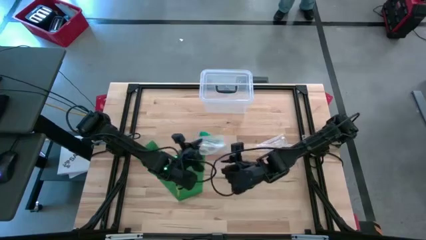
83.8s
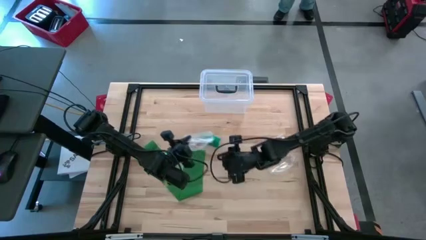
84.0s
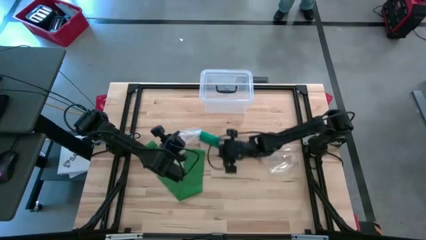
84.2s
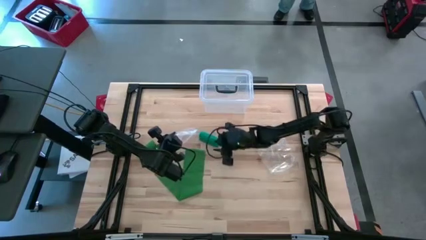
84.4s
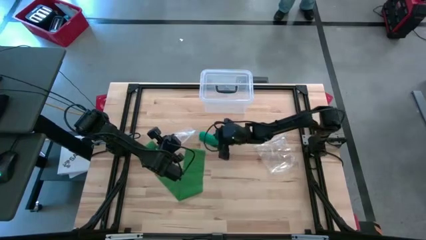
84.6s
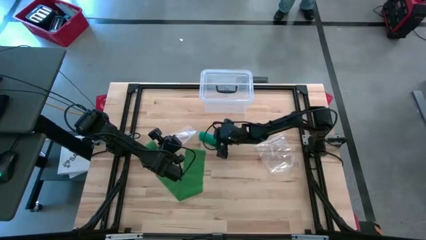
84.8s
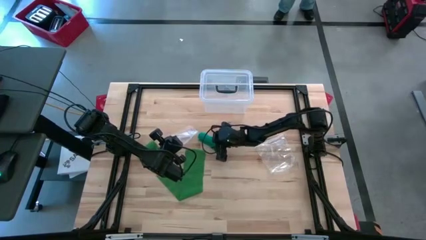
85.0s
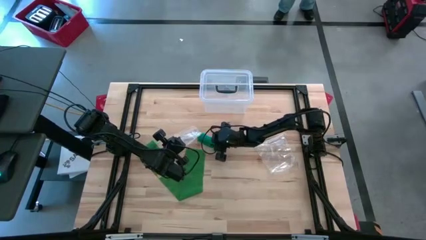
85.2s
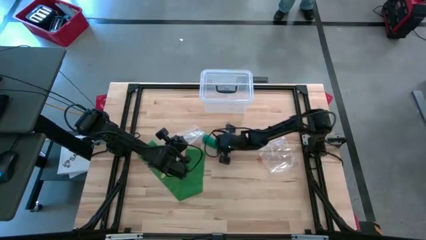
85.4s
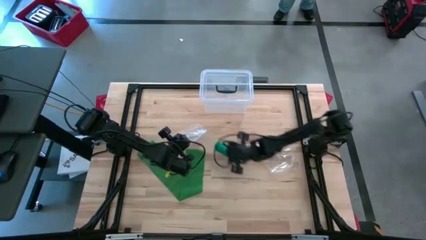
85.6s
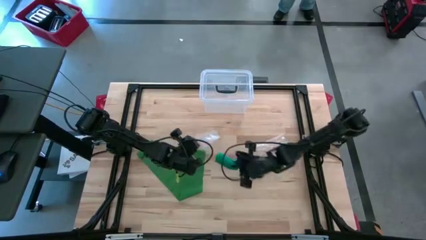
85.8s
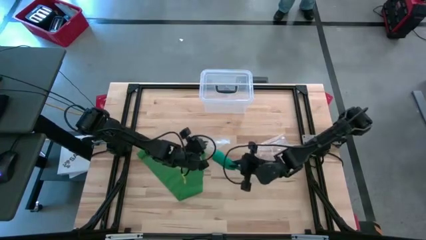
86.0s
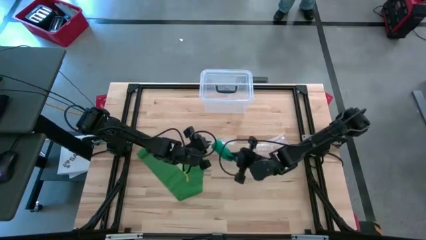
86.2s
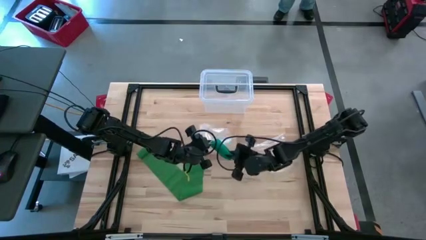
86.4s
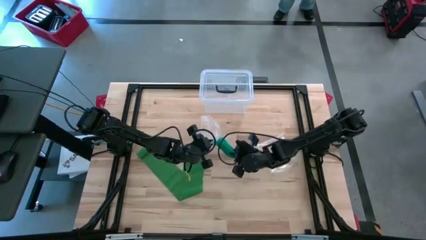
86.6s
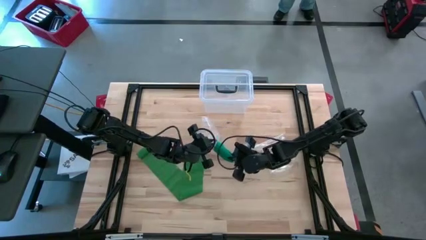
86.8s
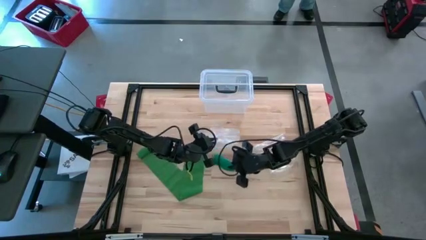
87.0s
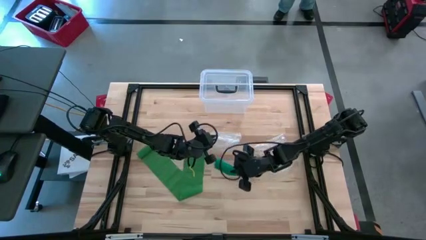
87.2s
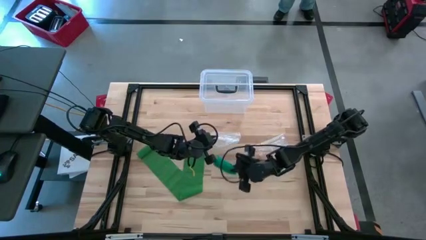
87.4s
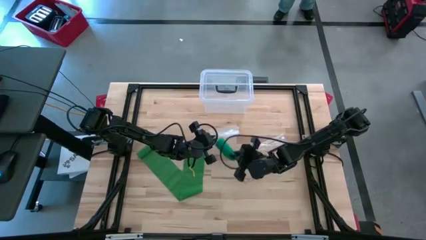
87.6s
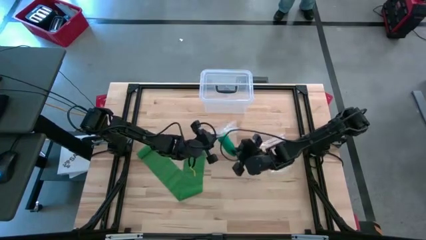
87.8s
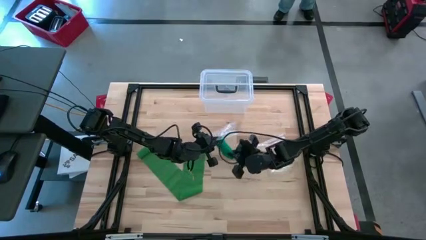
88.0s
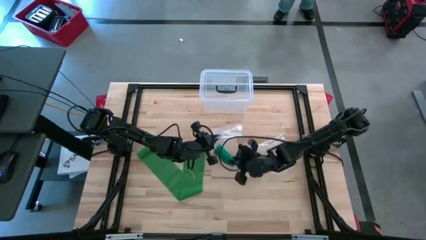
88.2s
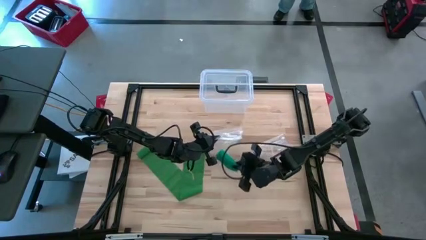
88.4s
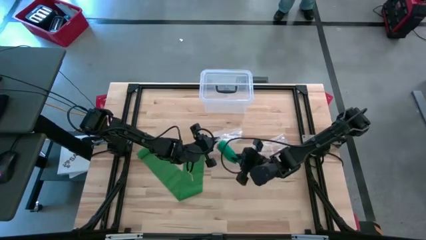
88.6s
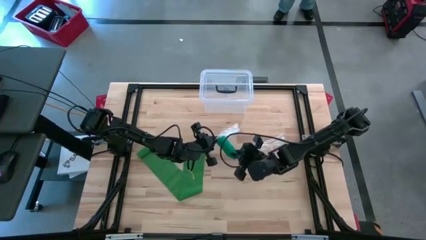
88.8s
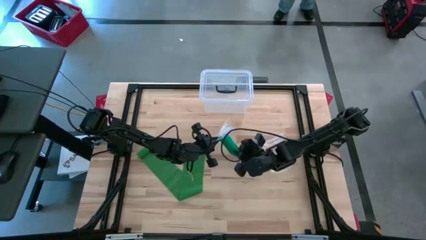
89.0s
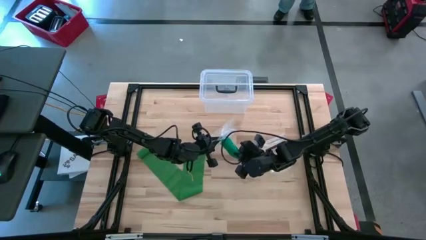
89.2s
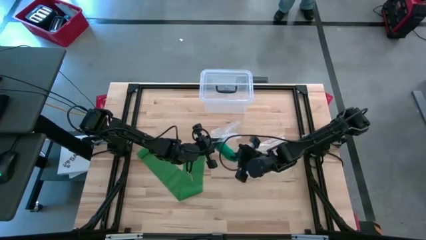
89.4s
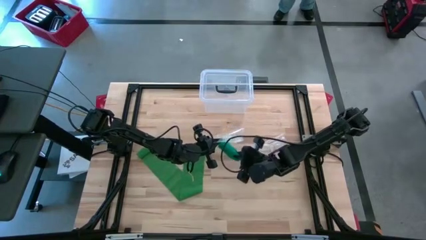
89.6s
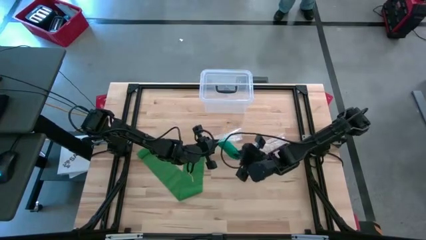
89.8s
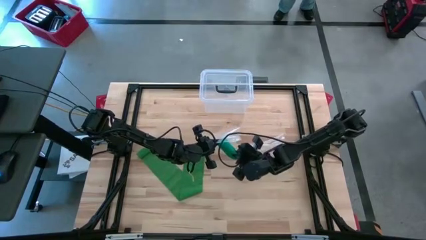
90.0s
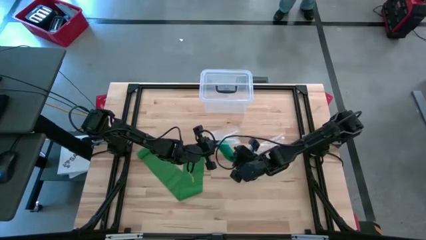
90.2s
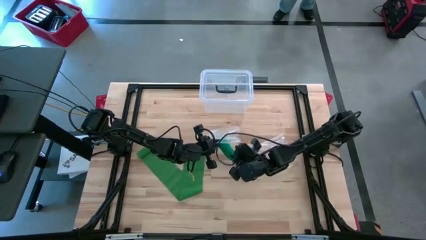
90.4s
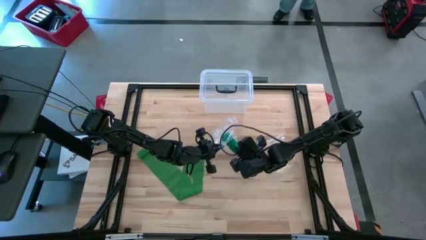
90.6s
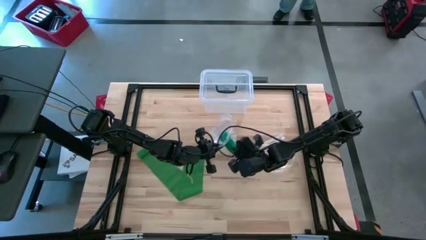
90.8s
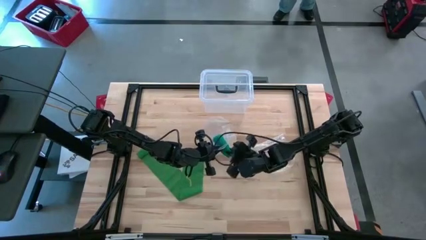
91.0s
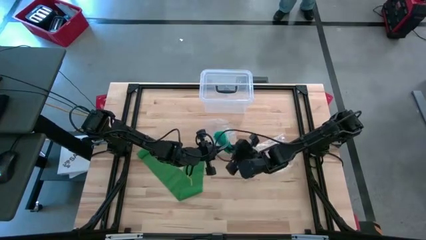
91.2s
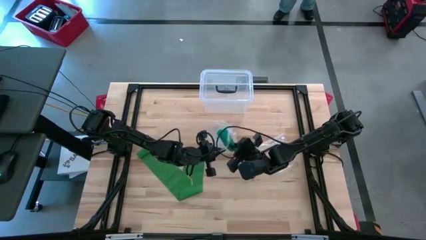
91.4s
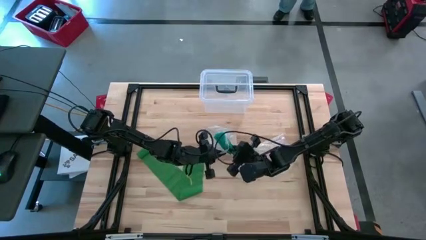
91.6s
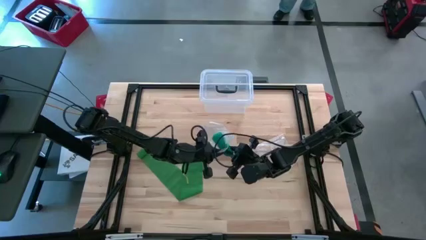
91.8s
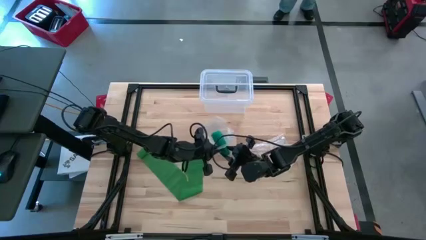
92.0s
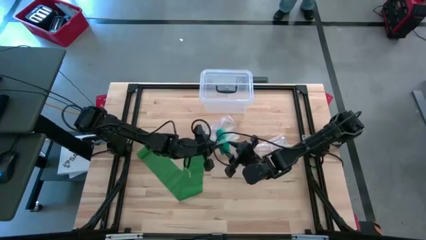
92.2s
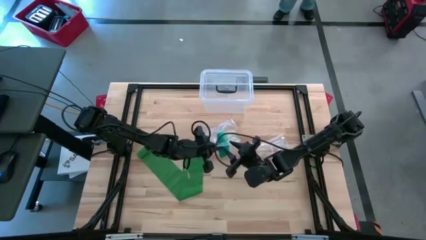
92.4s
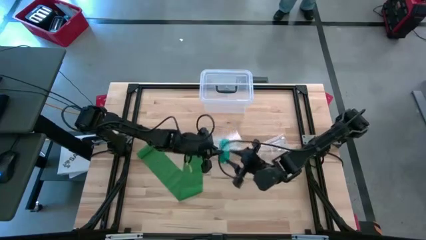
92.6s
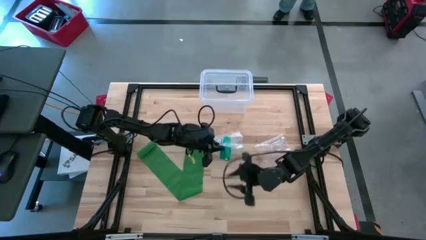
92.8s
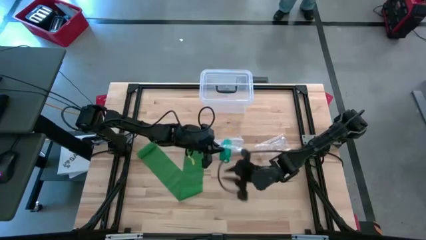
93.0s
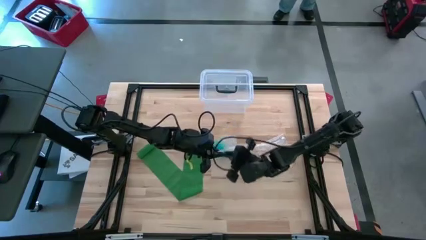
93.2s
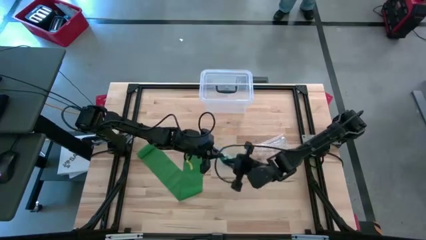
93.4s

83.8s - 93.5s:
Task: Roll bandage
Put the blue bandage into the left transparent zip bag

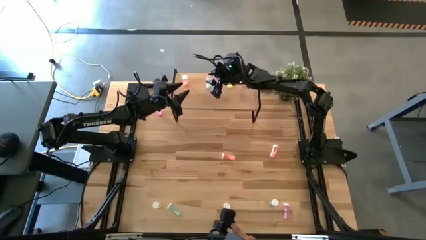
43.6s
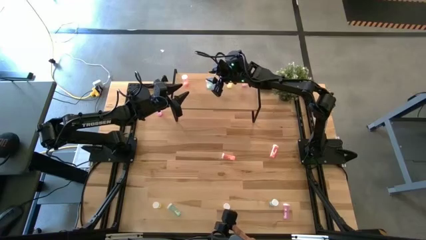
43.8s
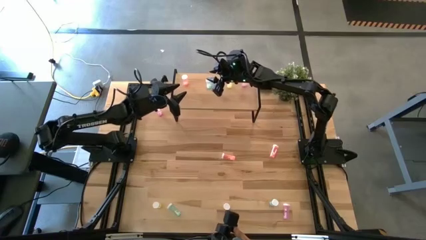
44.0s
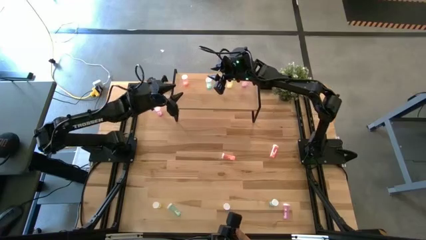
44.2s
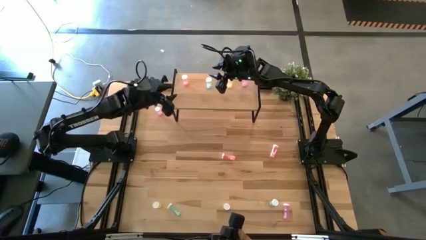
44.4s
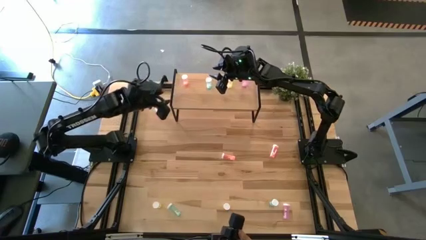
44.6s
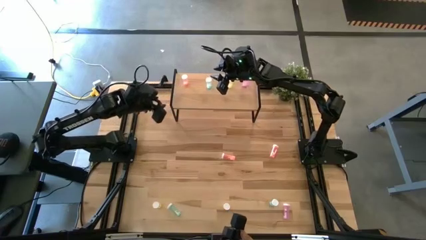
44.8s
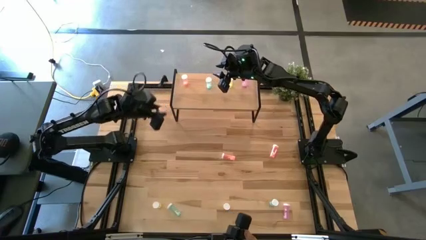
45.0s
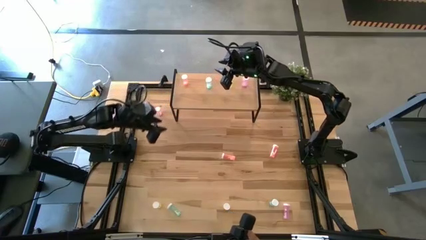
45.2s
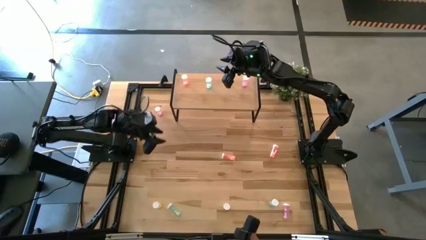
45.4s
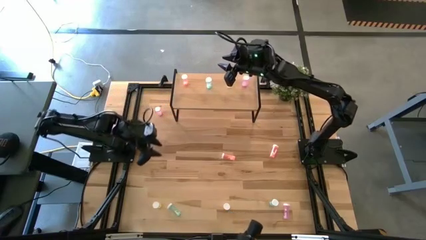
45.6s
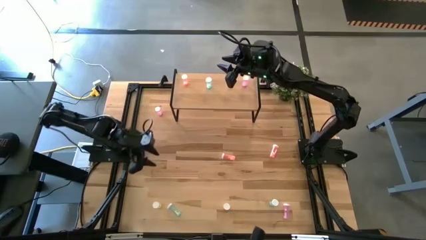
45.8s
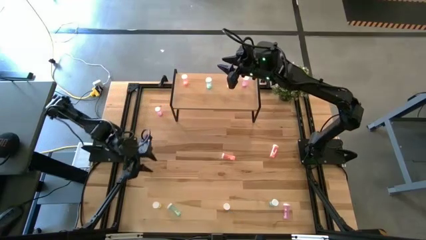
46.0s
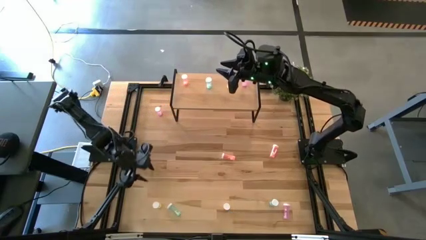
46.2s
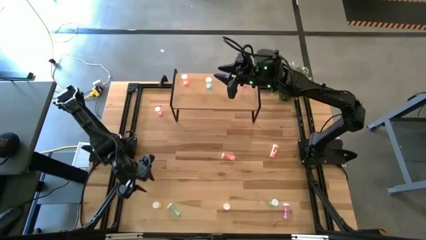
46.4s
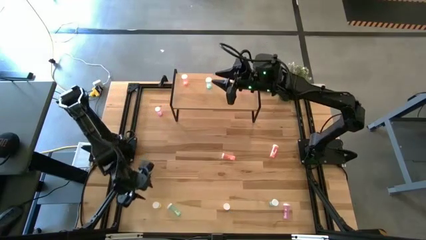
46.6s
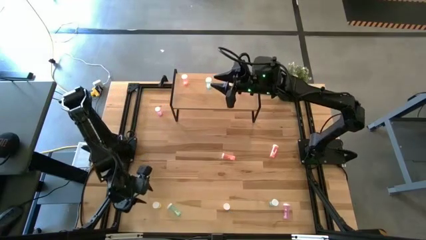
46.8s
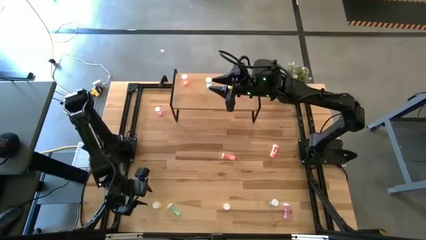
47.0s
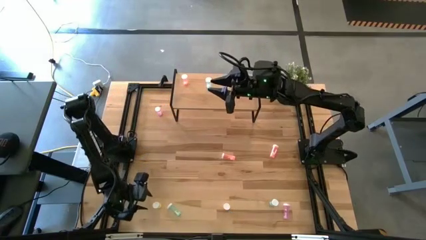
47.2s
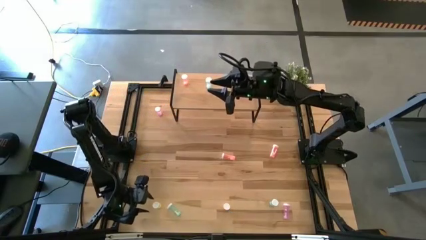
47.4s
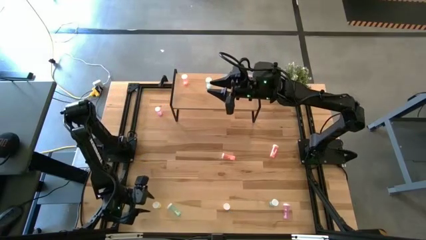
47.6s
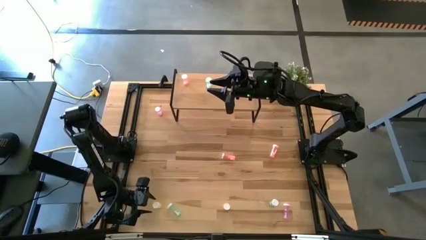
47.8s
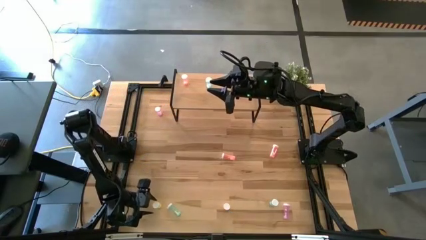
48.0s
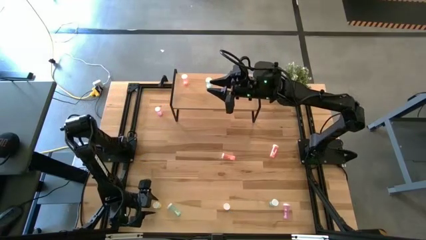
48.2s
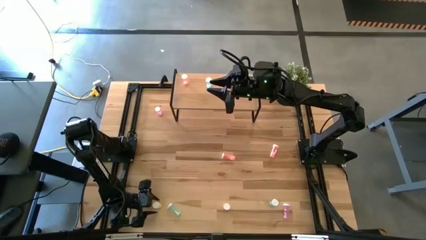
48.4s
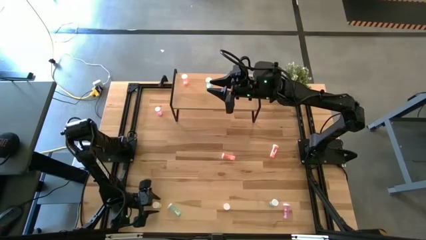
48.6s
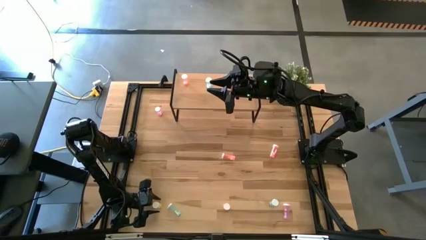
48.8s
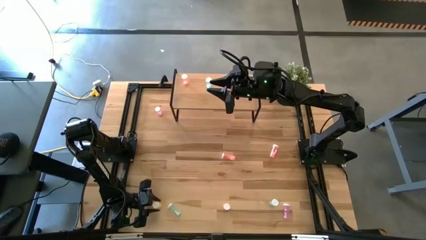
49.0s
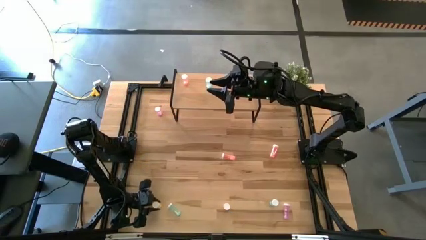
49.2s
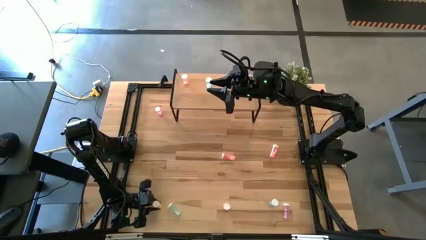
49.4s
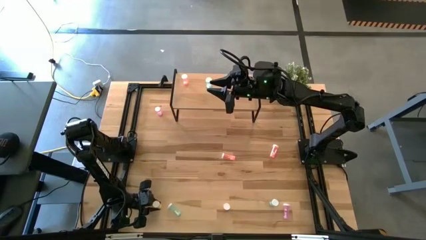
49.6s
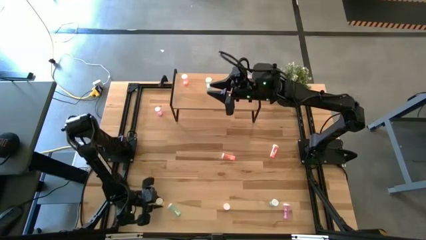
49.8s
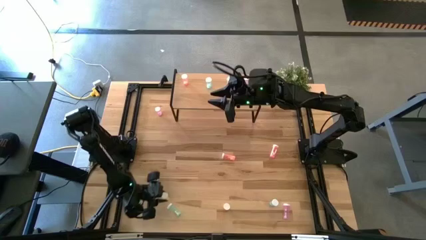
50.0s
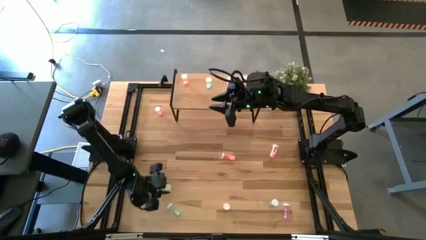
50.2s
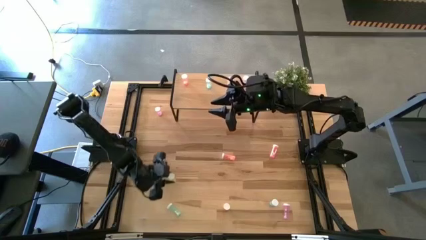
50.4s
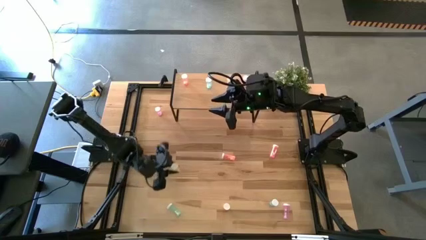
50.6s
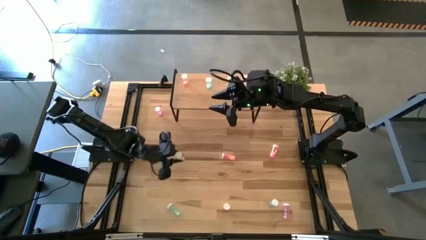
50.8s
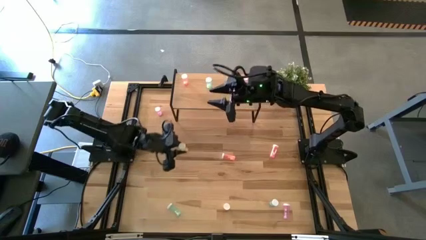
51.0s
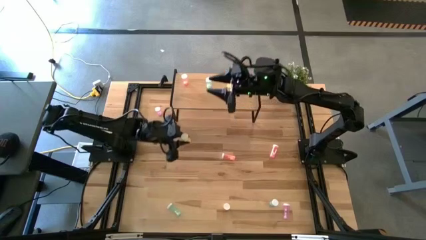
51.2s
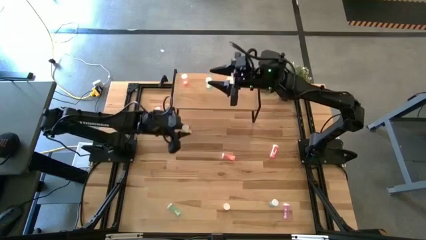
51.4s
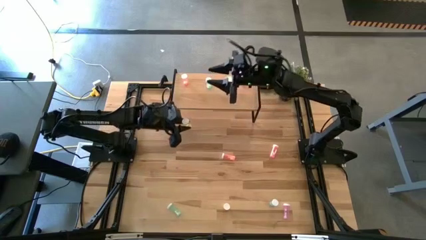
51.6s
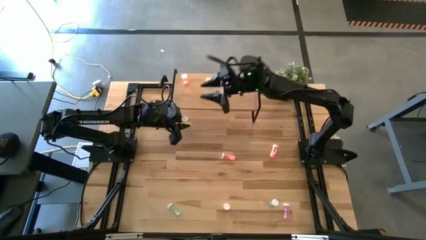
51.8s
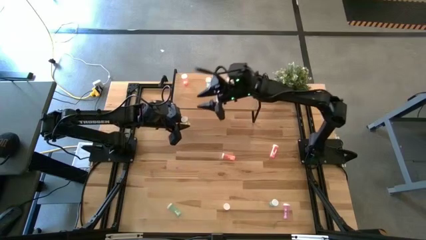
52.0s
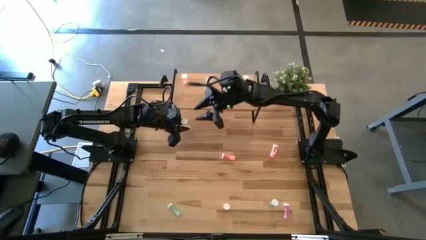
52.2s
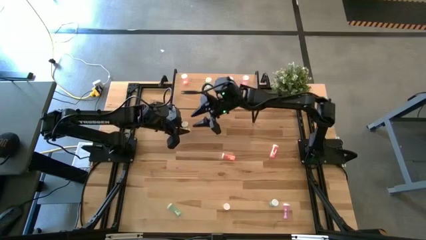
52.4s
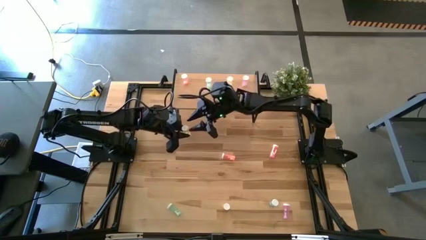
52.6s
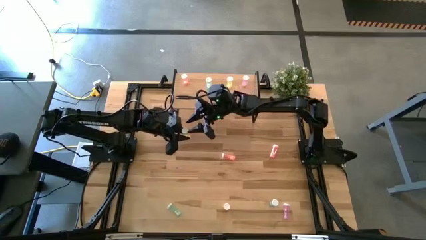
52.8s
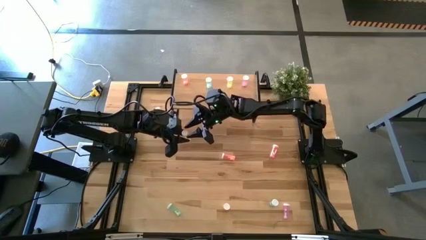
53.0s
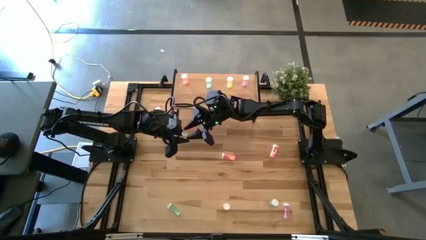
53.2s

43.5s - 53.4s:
Task: Pick and place medicine bottles onto shelf by color
Put the left yellow pill bottle on the shelf aligned with the other yellow pill bottle
